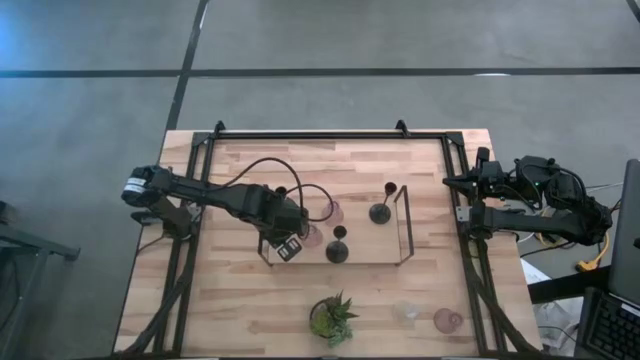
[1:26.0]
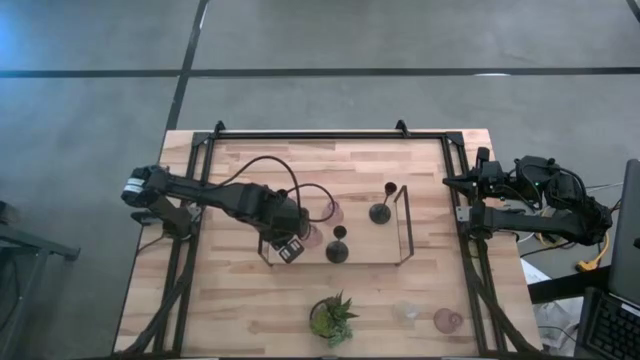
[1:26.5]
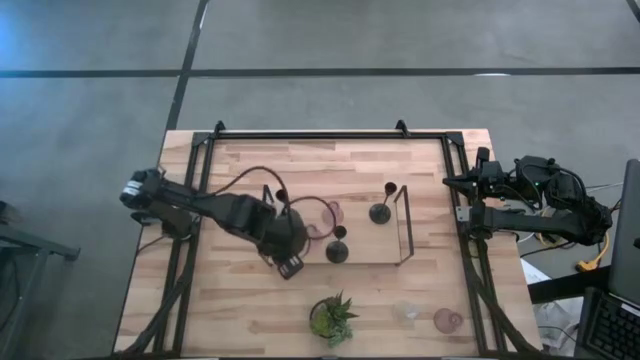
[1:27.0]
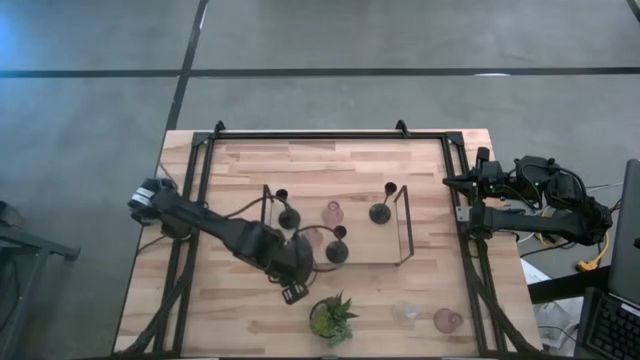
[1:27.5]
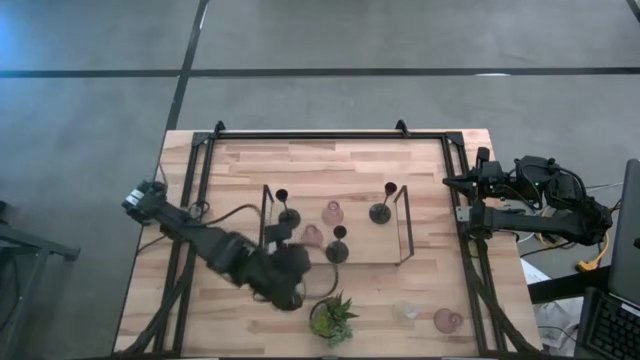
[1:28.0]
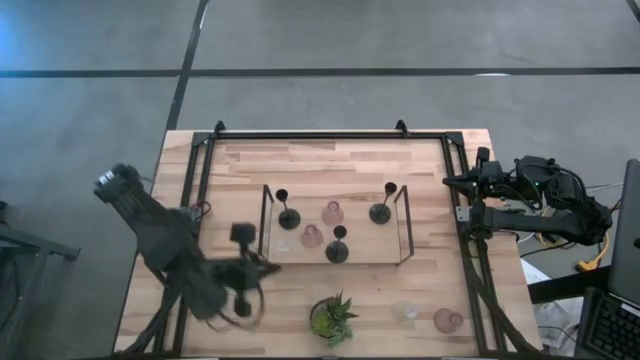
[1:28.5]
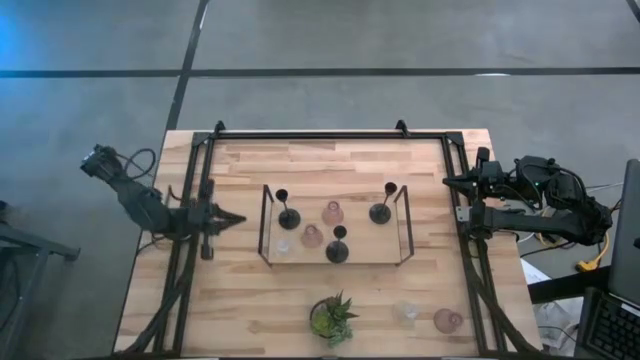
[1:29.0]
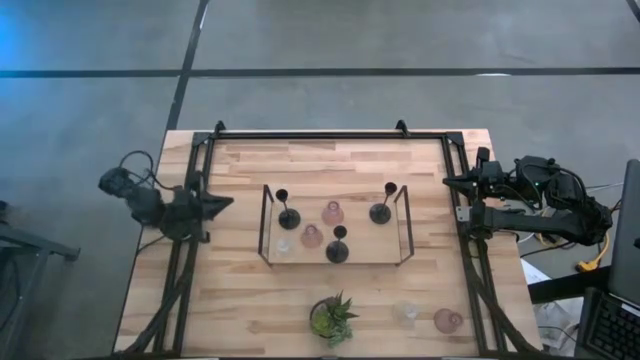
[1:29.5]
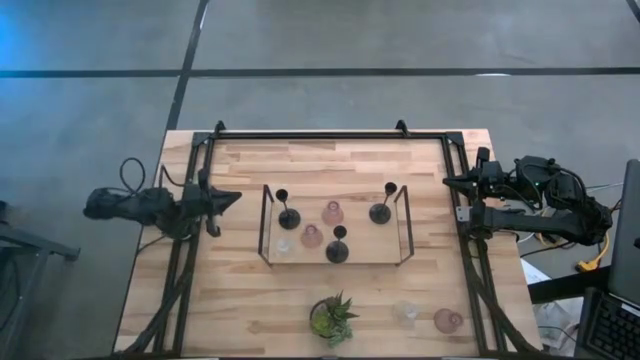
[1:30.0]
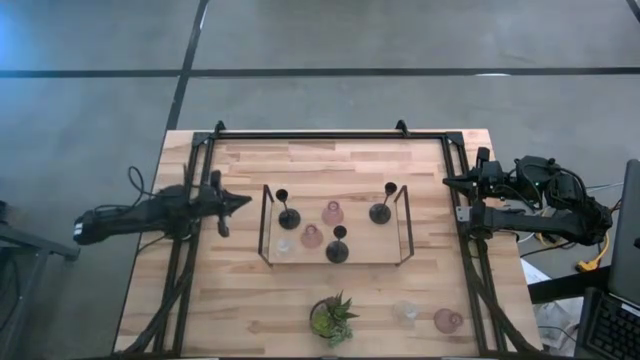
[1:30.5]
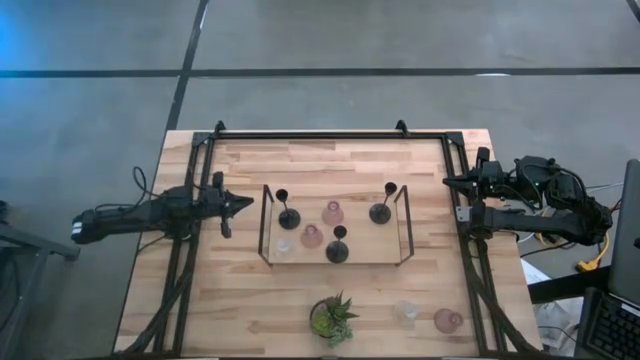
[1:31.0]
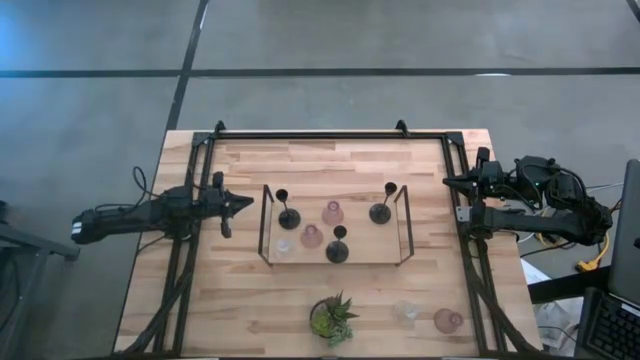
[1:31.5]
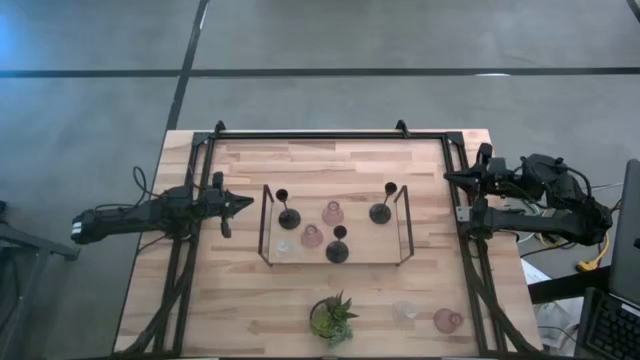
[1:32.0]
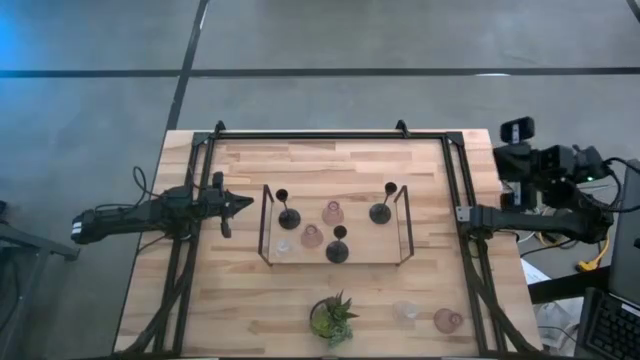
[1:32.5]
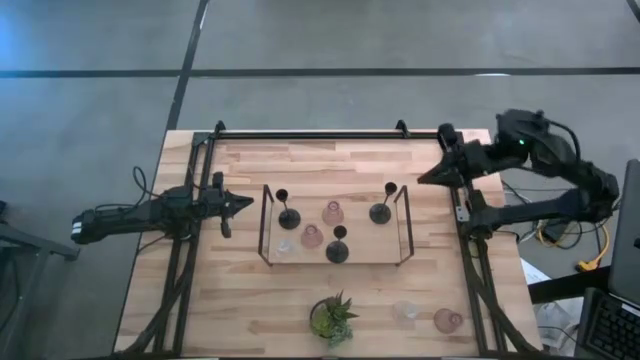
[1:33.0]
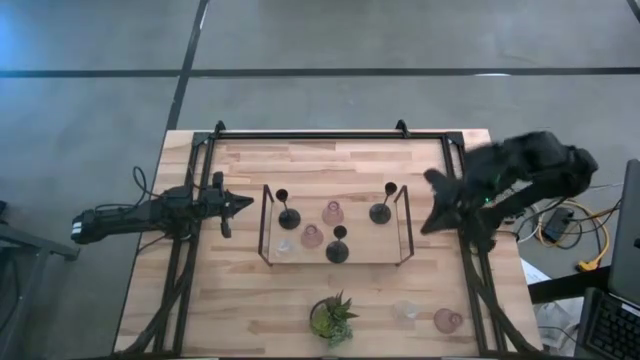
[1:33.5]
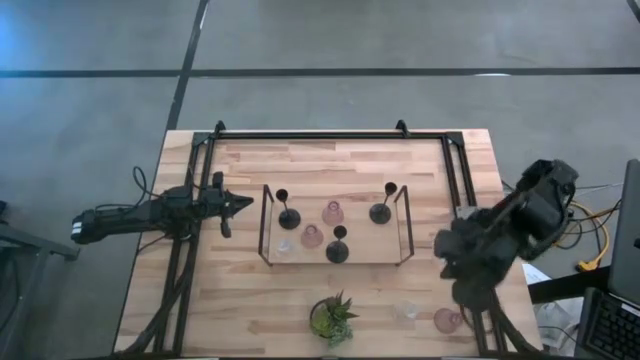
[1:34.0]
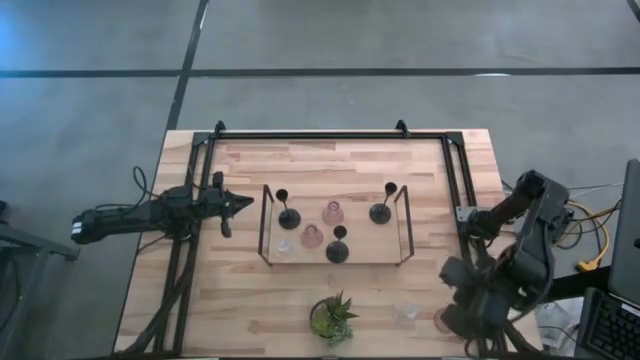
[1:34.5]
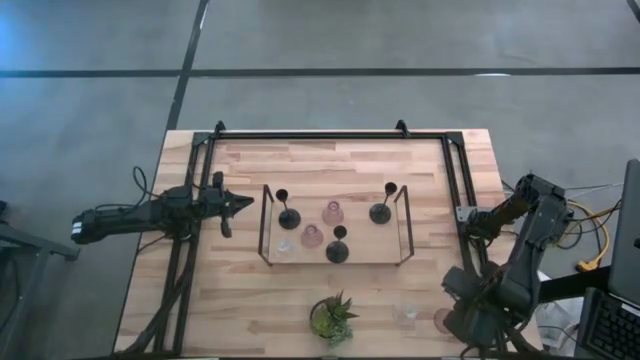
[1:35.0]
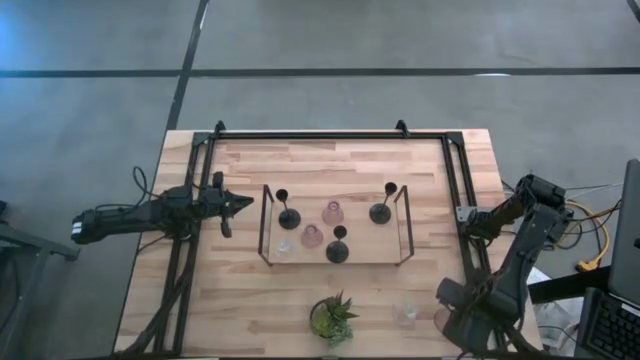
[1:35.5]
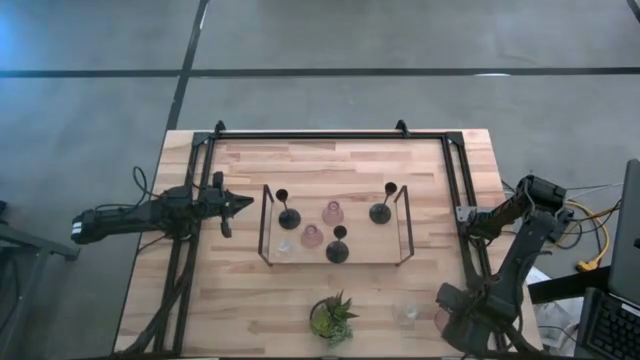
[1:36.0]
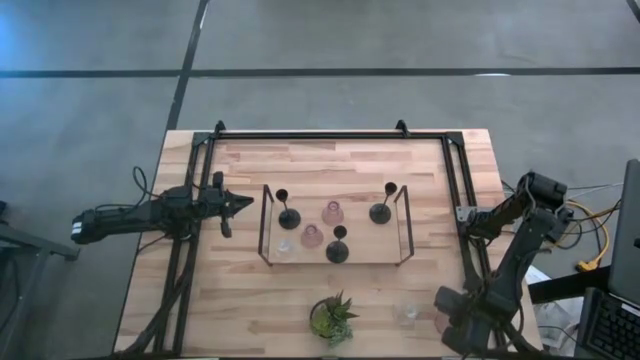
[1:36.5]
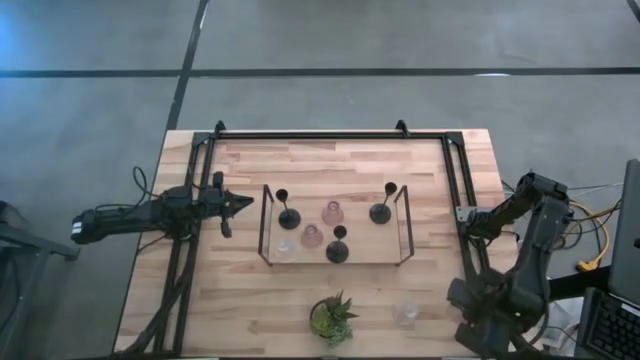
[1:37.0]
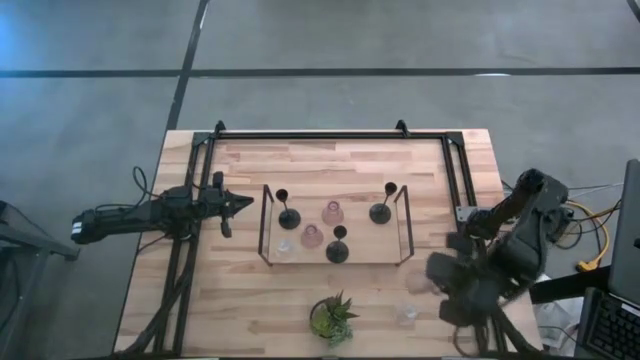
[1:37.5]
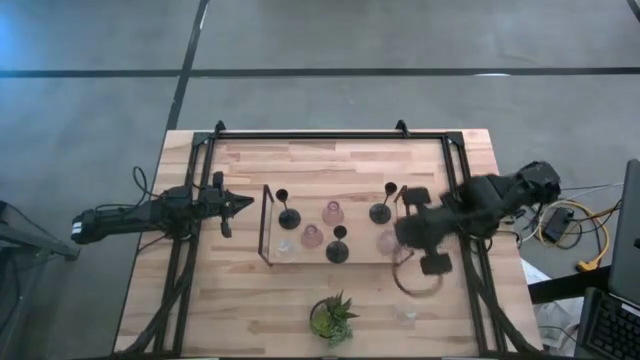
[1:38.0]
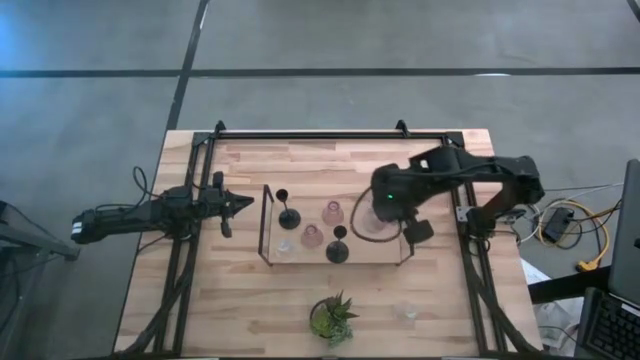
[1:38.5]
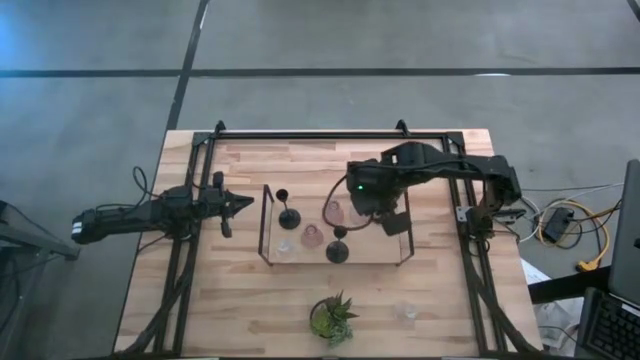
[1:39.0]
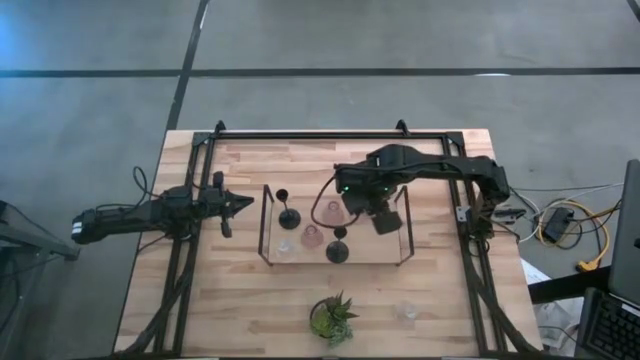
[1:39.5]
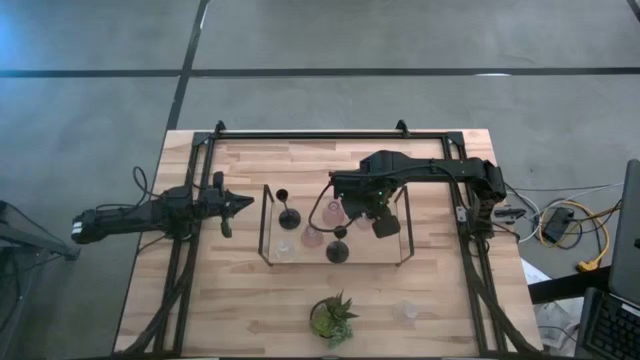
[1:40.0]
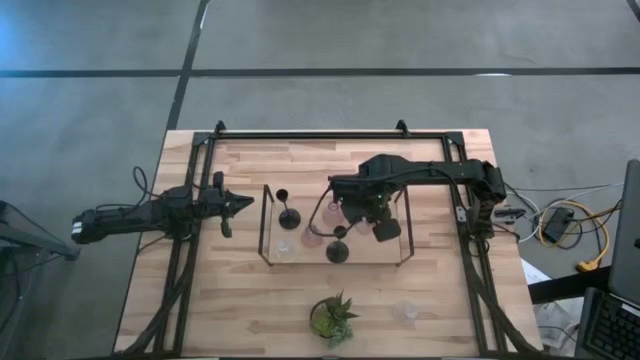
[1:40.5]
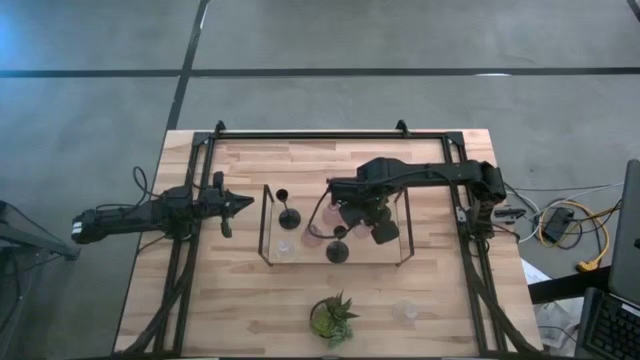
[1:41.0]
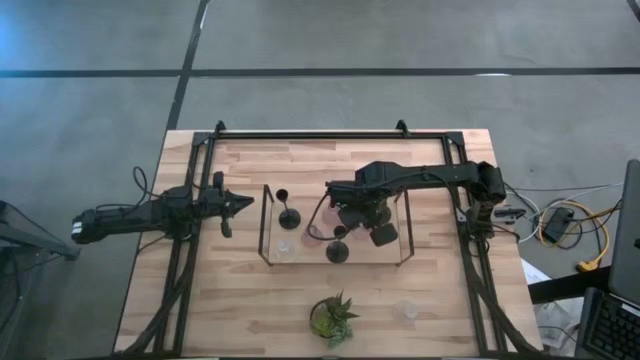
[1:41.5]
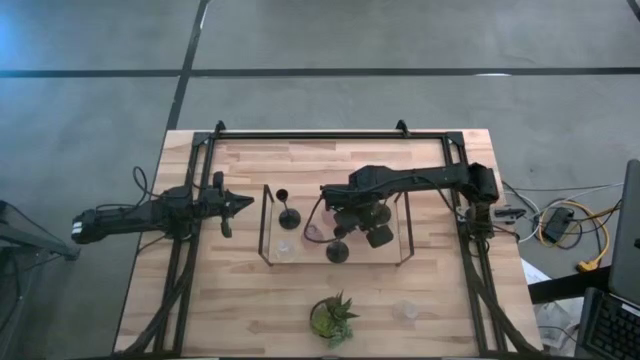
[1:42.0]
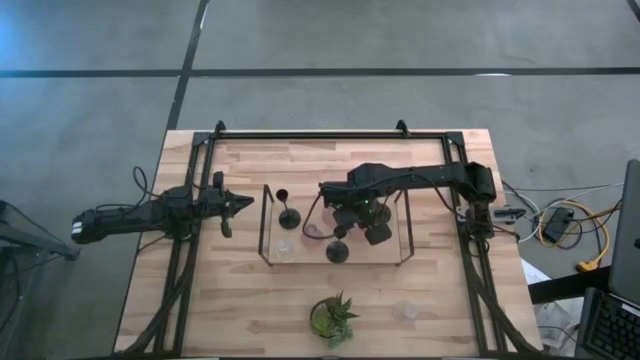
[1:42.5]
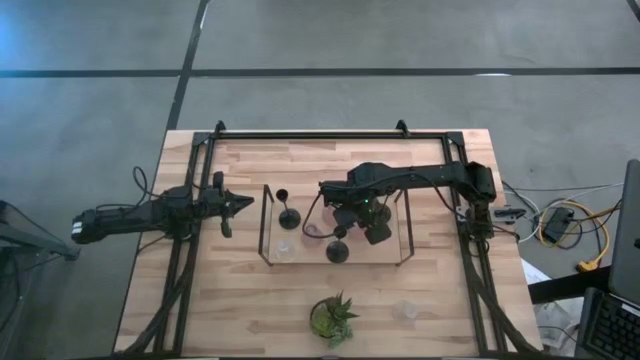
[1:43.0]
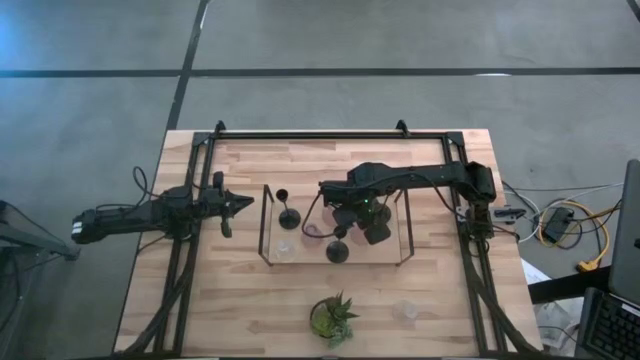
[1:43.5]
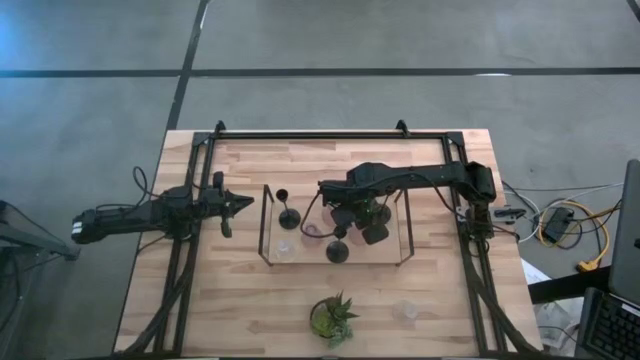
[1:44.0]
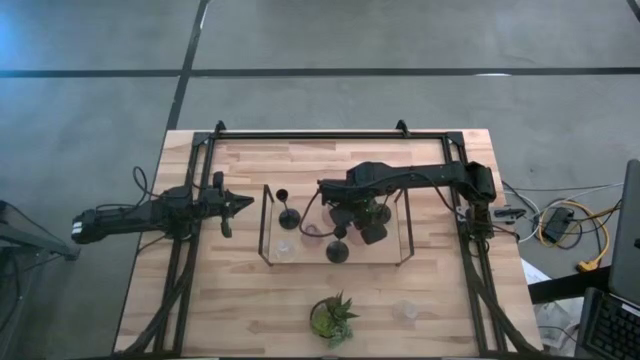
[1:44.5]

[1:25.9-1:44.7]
Task: Pick & Place candle stick holders
Put the pink glass candle holder on the shelf

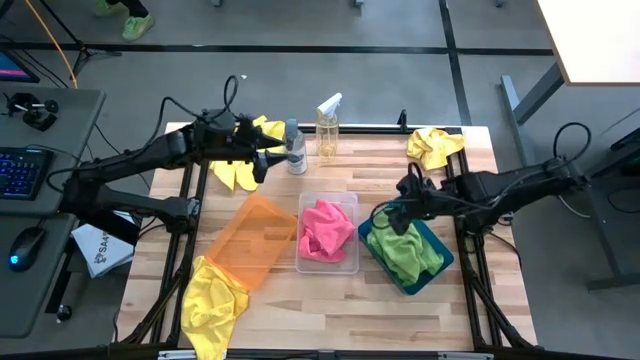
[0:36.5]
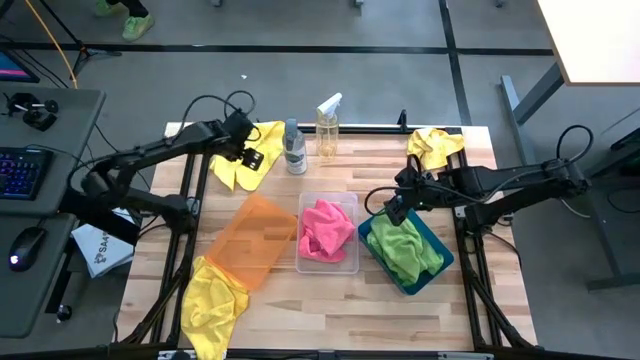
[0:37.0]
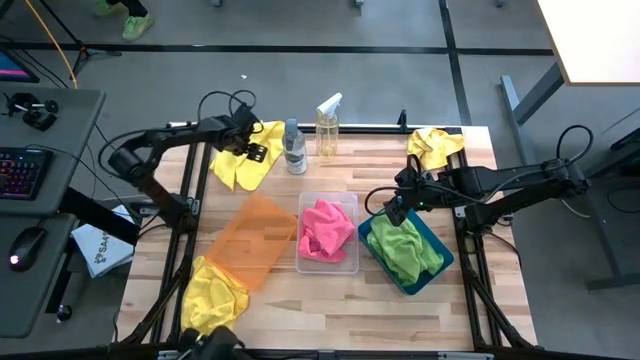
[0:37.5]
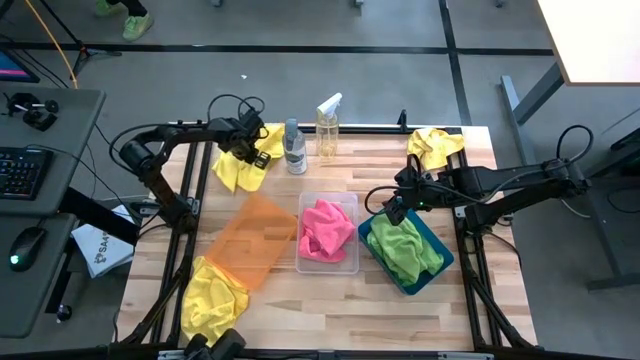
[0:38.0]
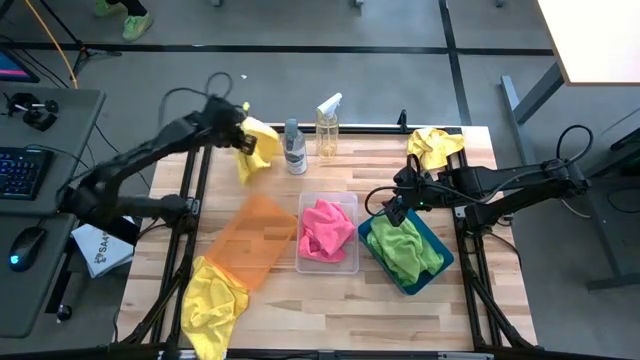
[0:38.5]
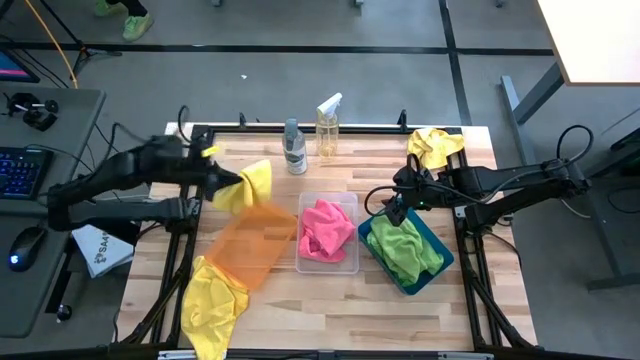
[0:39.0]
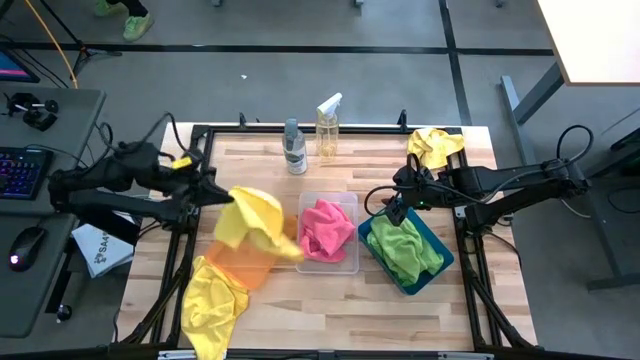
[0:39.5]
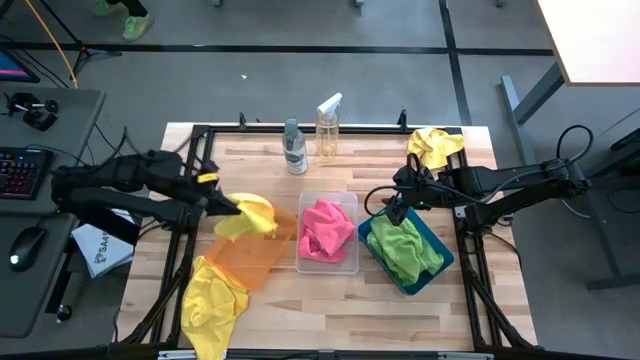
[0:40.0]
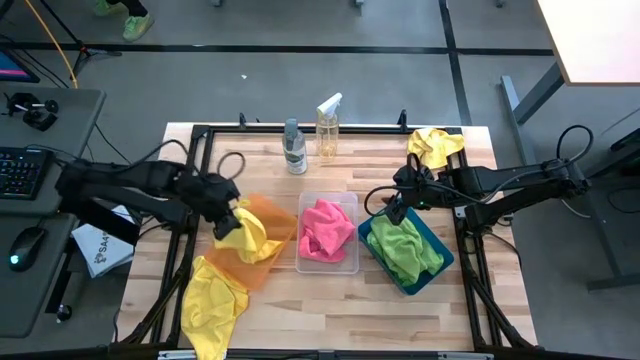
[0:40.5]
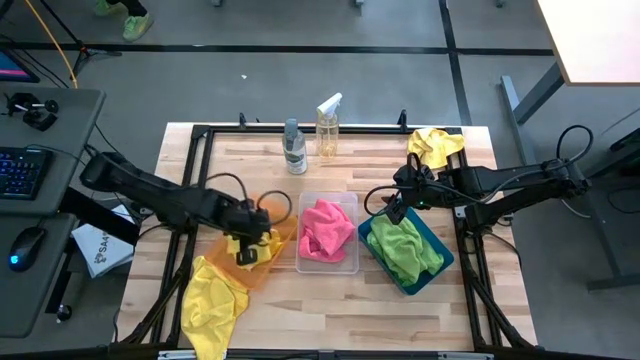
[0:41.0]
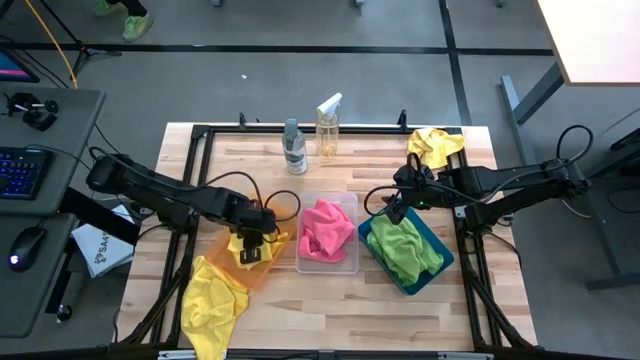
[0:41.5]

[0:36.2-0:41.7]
Task: Sort microfiber towel by color & place in baskets
Put the top left yellow microfiber towel into the orange bin
